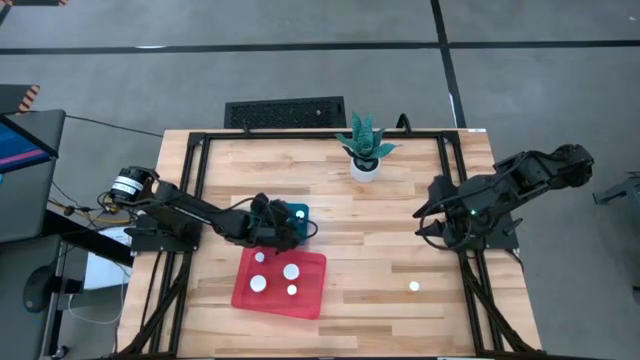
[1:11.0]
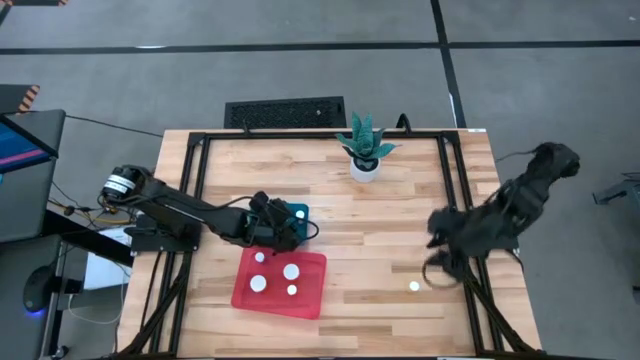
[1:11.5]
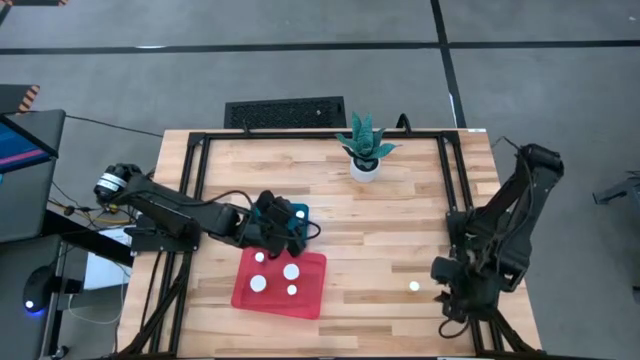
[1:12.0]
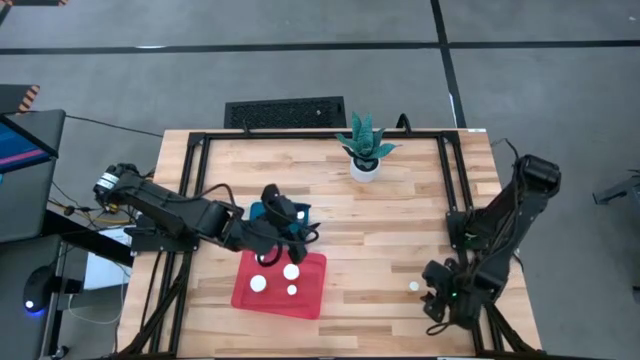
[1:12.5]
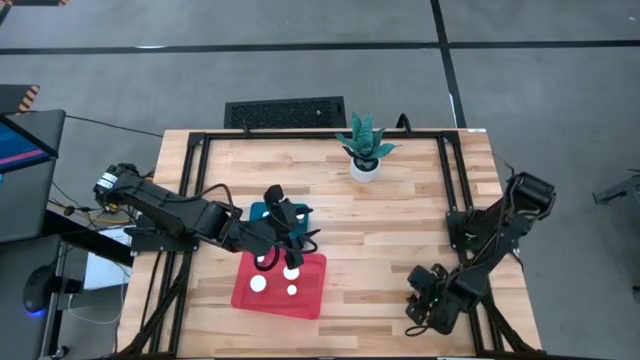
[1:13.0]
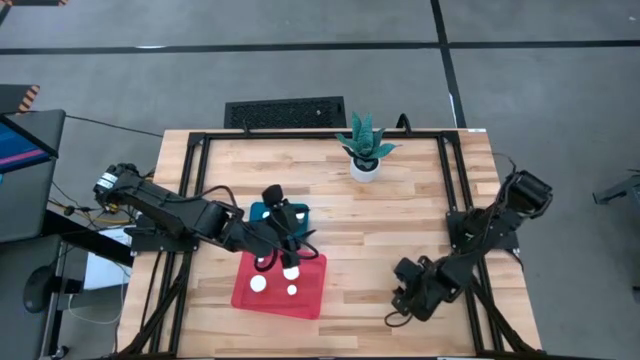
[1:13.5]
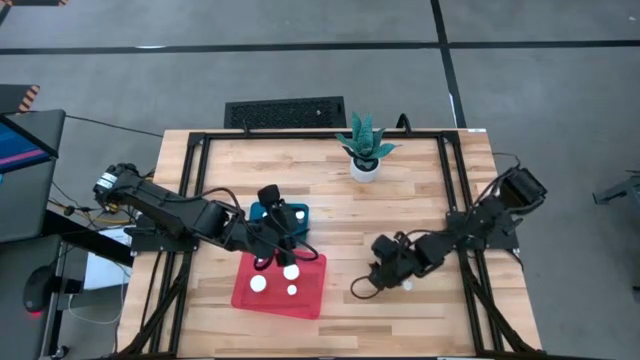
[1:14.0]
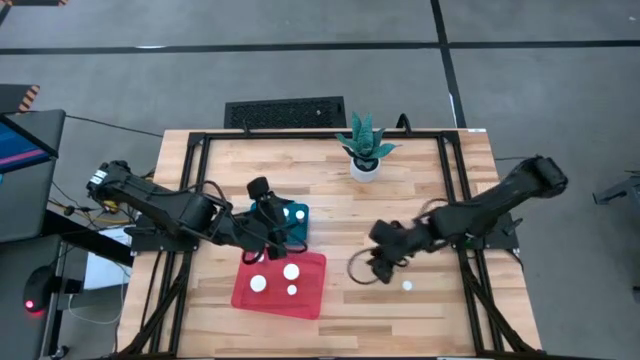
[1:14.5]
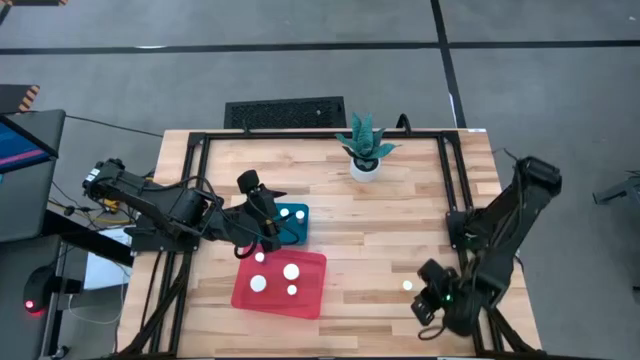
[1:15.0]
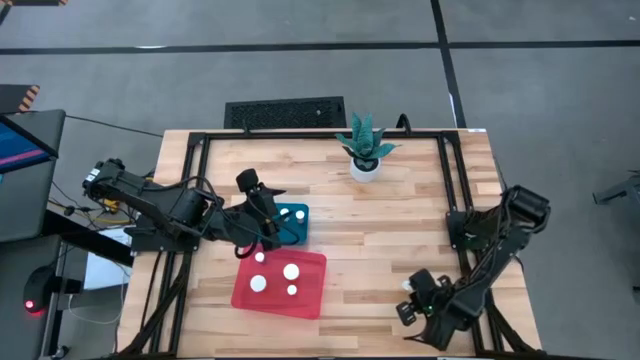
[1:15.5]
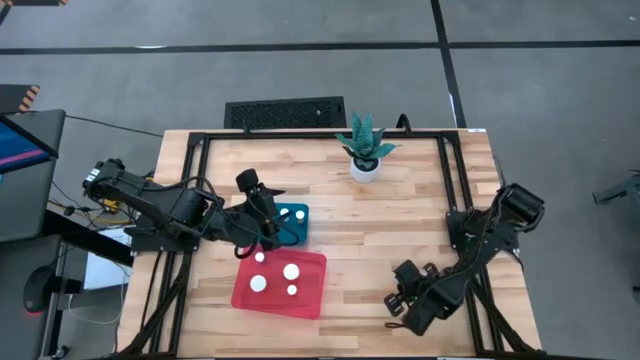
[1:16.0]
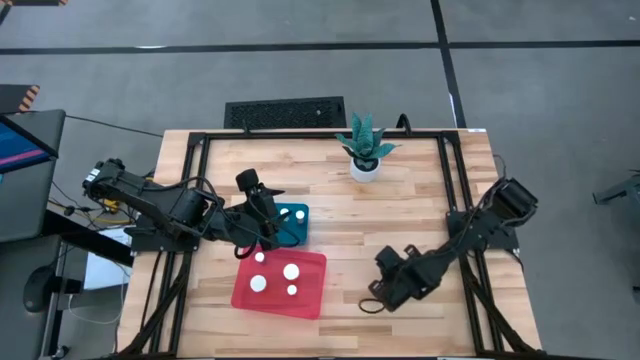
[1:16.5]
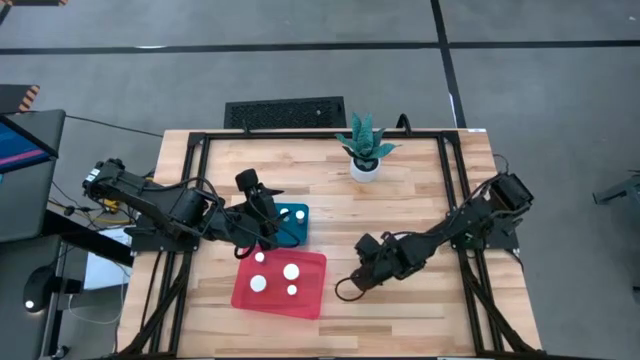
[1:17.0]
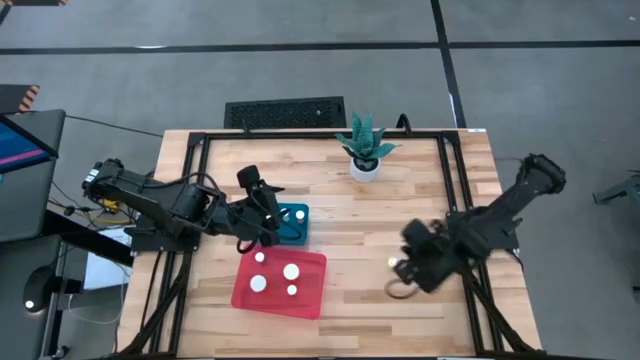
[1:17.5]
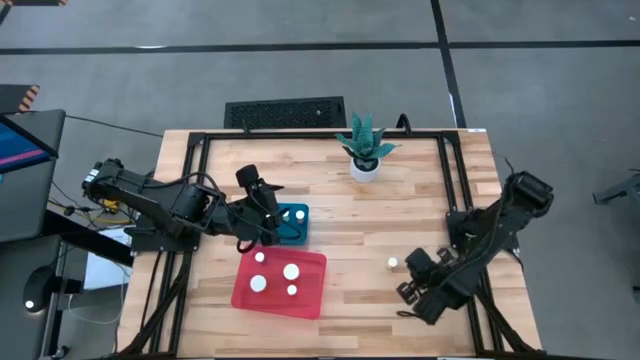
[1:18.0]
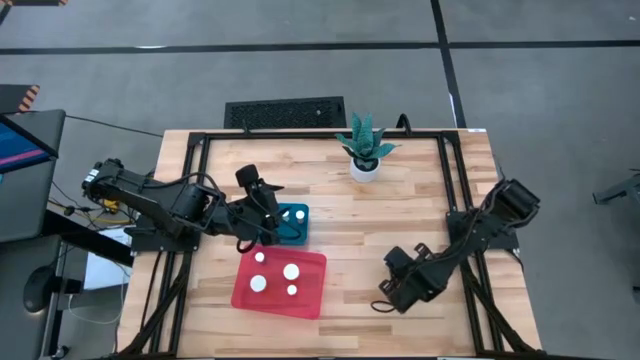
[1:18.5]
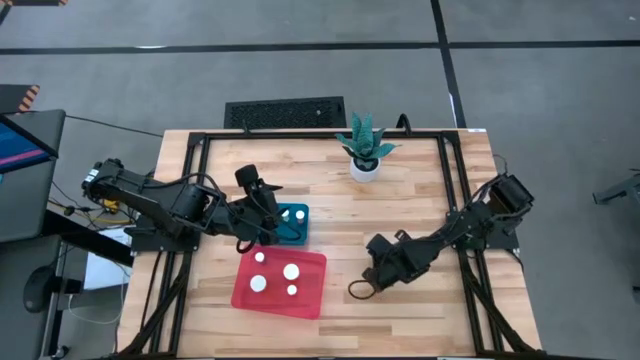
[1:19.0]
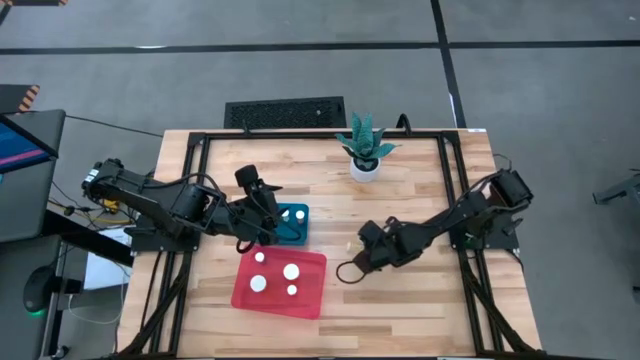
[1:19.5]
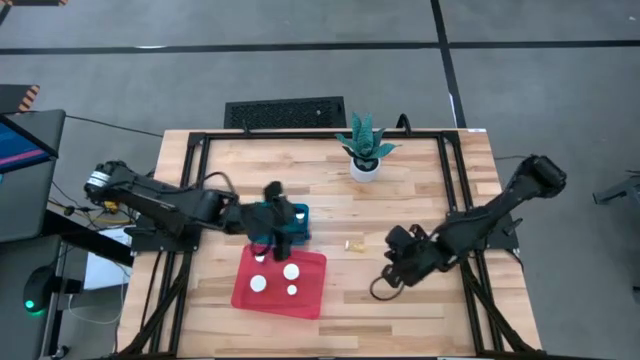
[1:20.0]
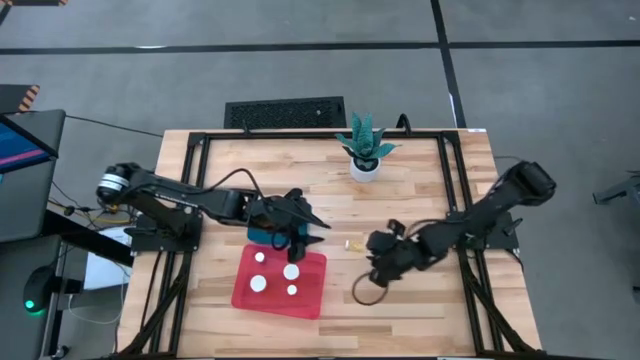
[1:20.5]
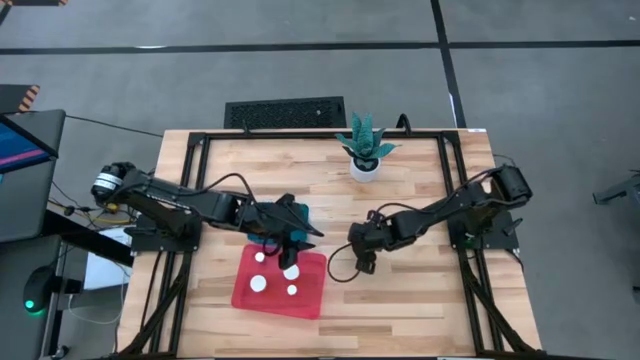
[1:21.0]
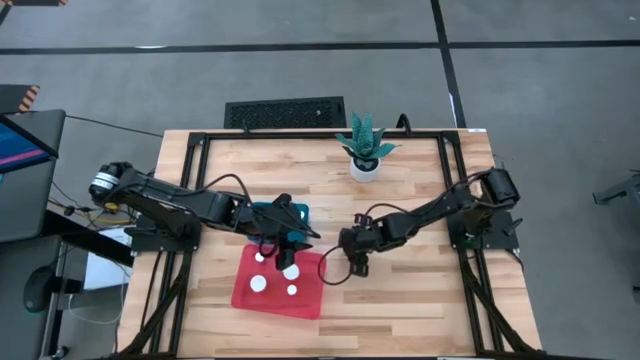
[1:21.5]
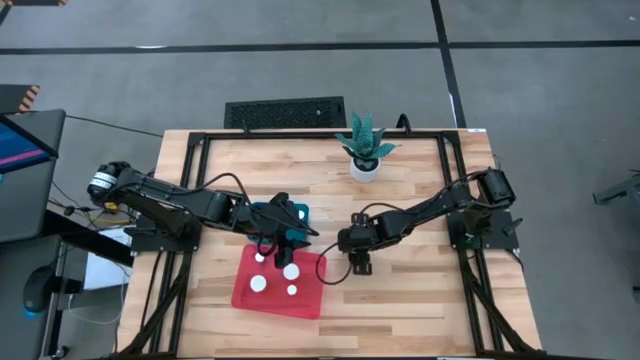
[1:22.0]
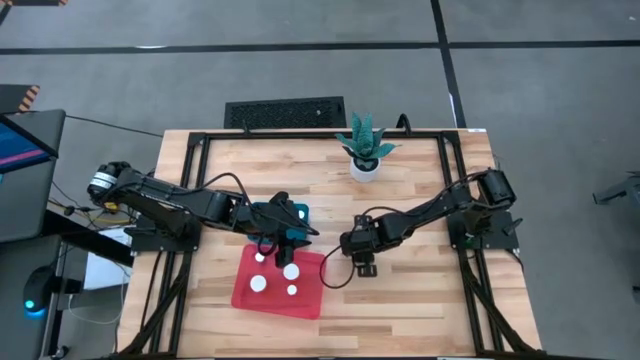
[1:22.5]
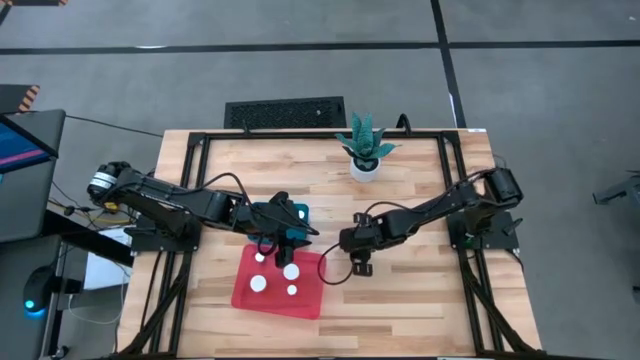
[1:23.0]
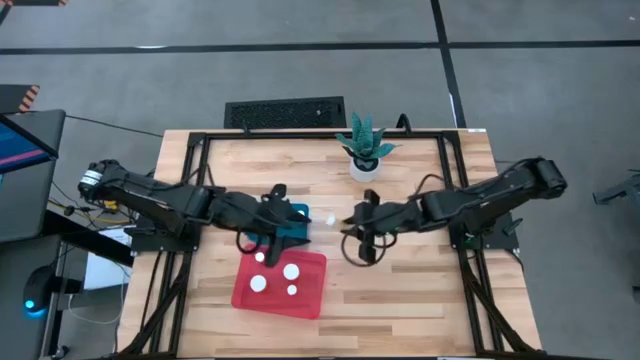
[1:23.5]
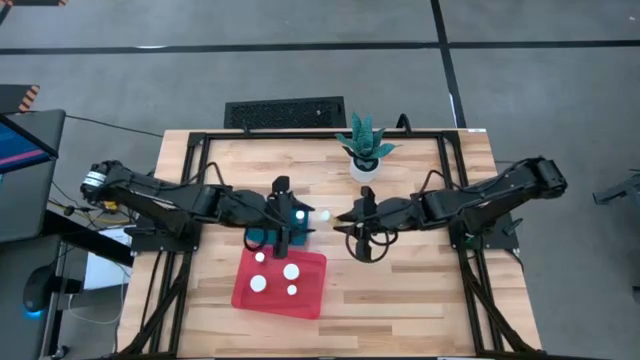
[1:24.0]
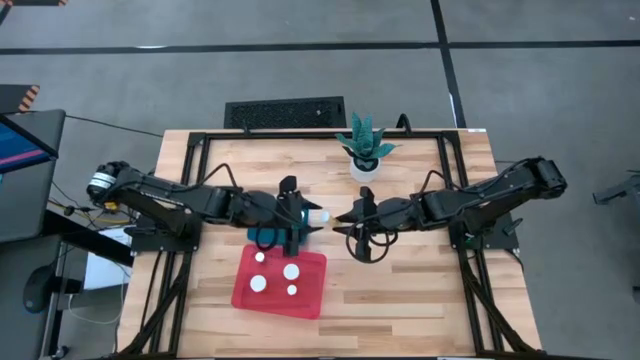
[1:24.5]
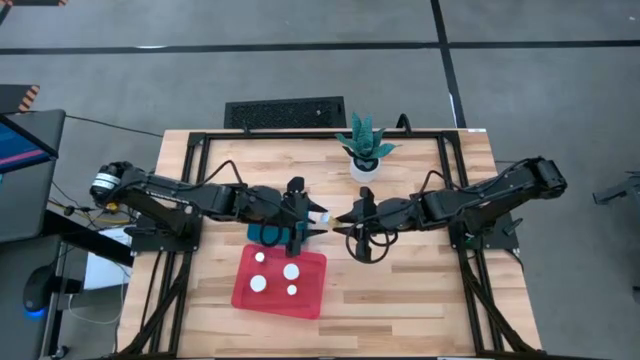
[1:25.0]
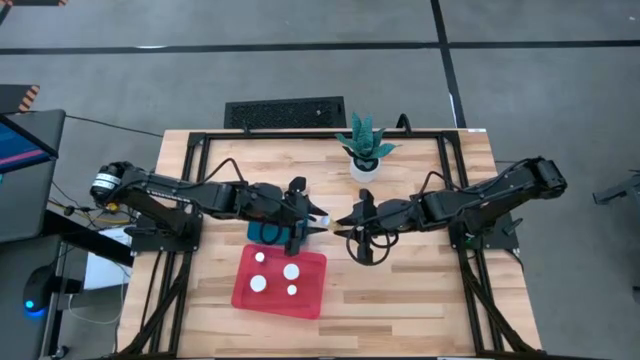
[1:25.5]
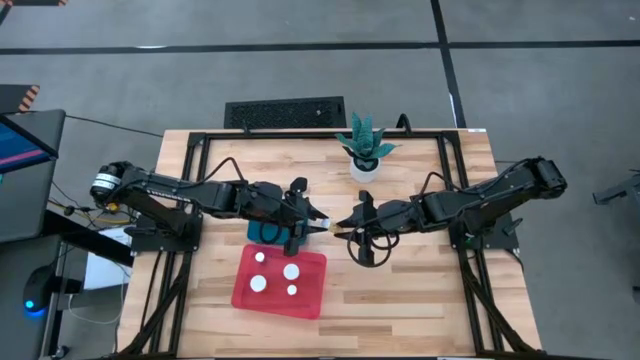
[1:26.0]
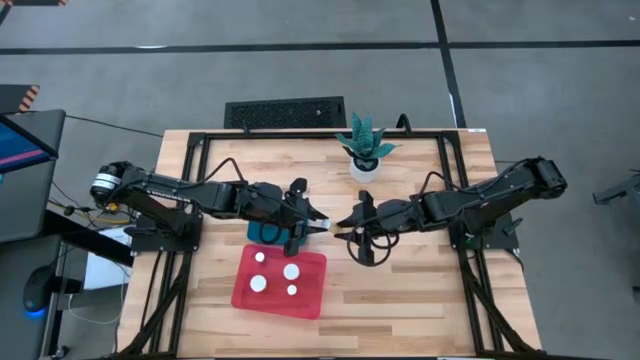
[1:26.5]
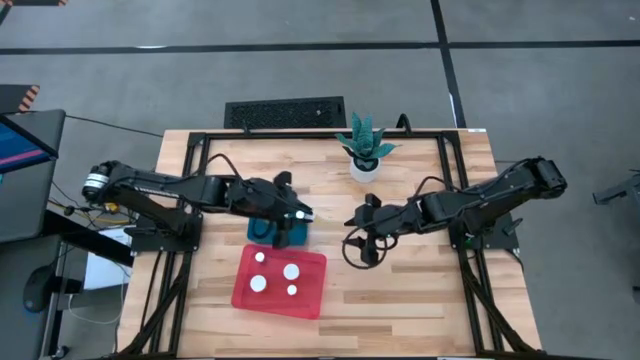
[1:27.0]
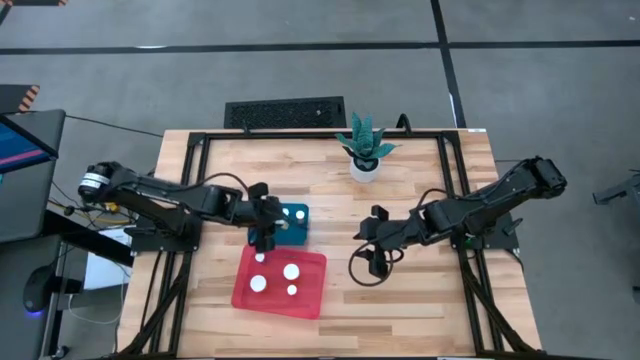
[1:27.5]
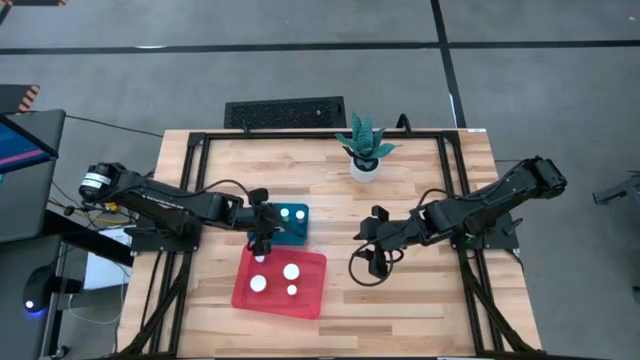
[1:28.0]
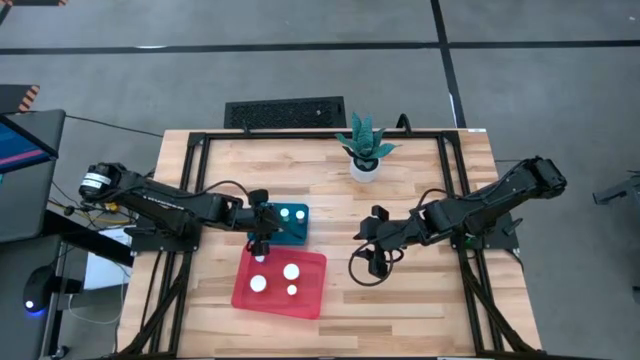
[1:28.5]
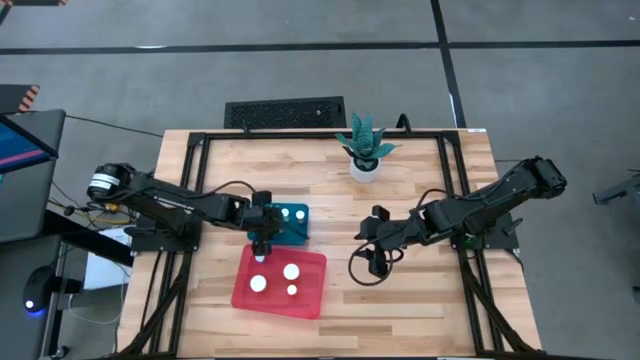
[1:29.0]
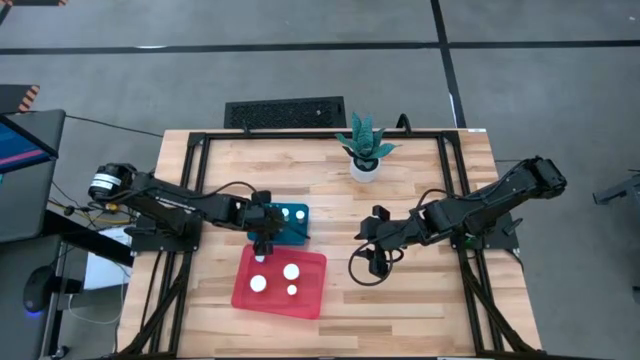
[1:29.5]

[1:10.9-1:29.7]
Task: Pick and place medicine bottles into bin by pill shape (circle, oval)
Put the yellow tablet bottle into the blue bin

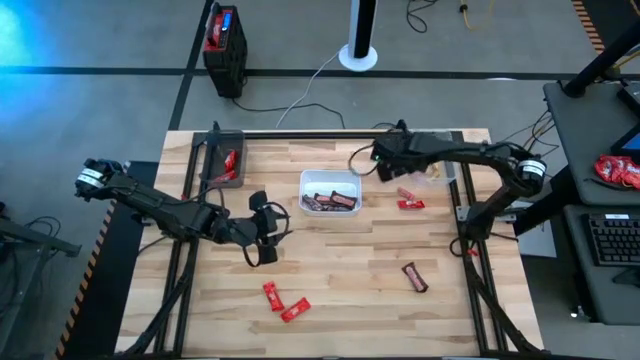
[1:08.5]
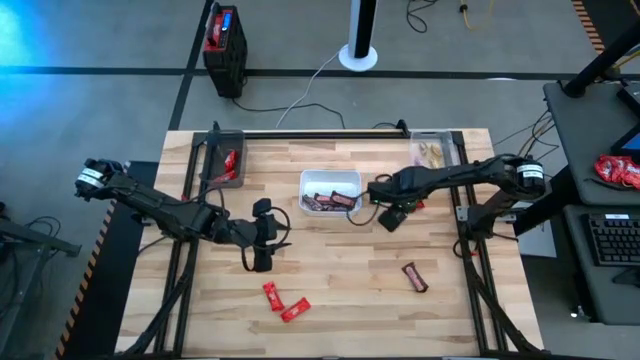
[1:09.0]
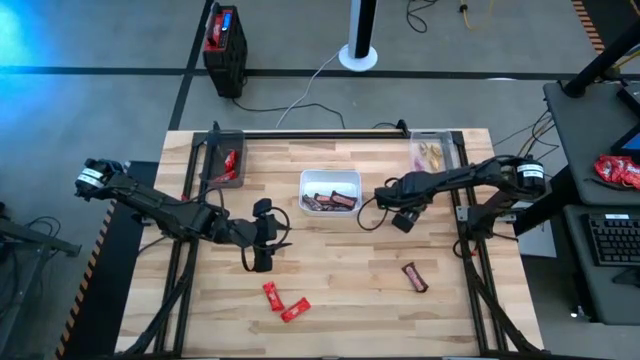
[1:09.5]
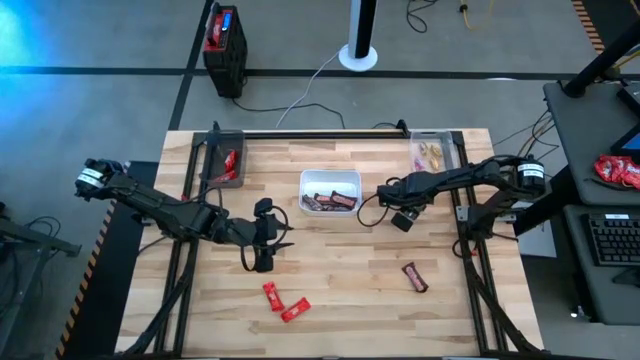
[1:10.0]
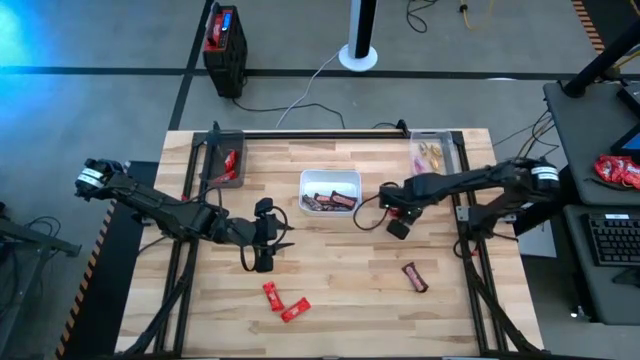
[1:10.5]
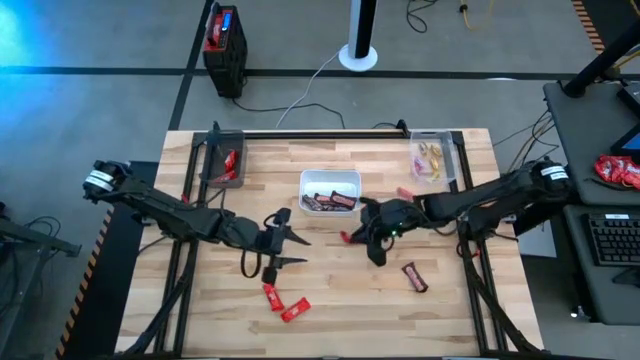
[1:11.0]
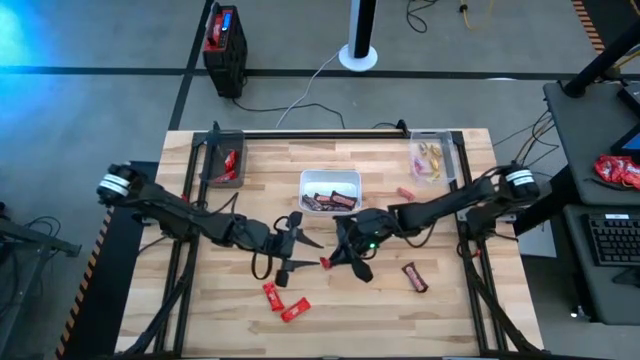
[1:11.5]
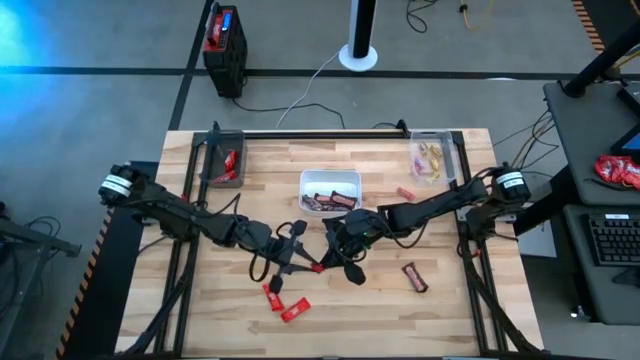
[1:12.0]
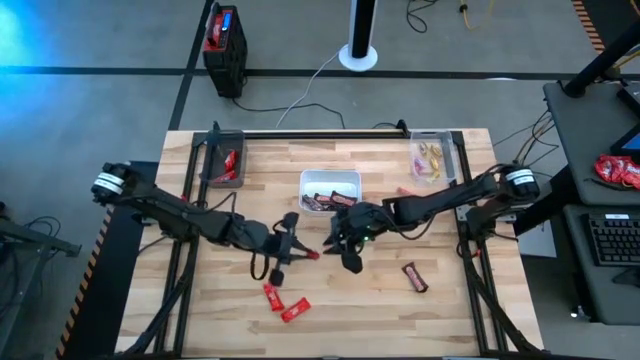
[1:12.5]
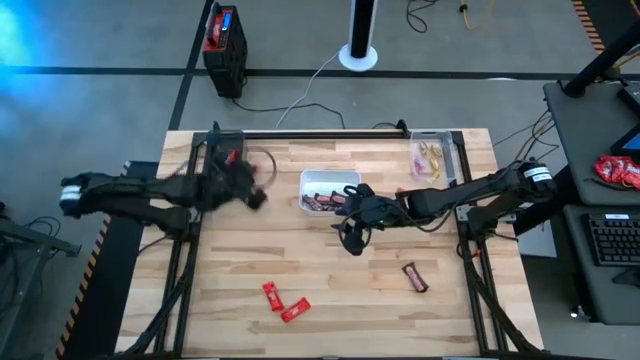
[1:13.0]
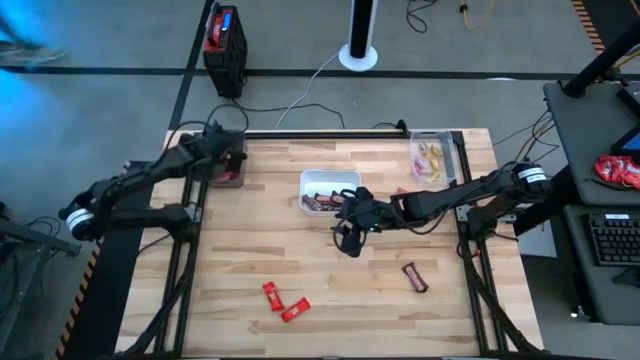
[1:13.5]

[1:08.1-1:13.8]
Task: Sort candy by brand, put in halloween buckets
Put the red chocolate bar into the black bin
